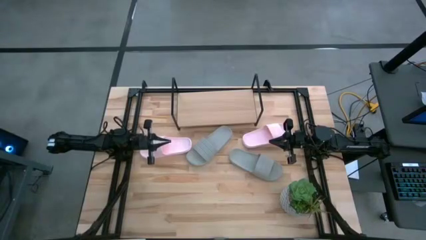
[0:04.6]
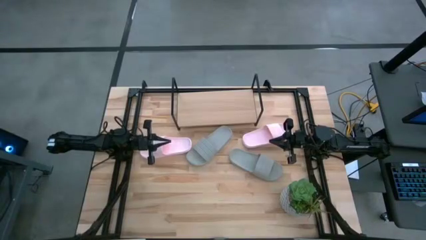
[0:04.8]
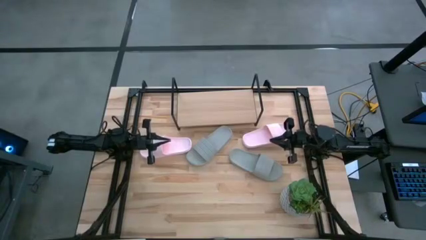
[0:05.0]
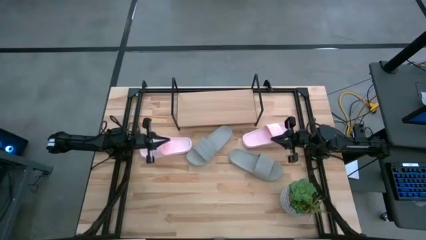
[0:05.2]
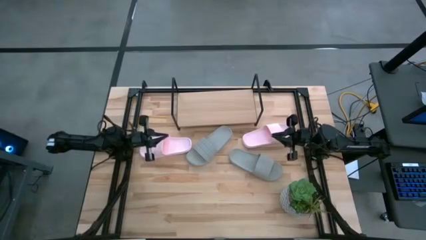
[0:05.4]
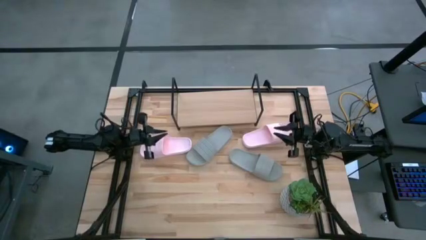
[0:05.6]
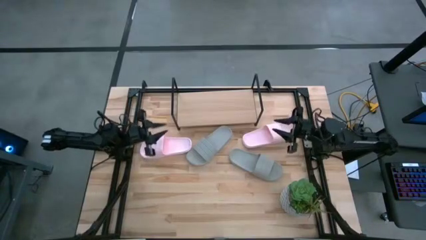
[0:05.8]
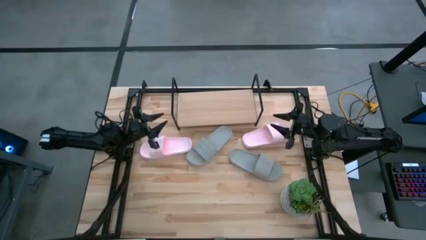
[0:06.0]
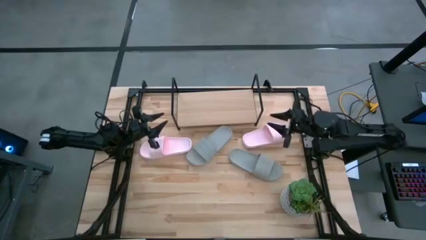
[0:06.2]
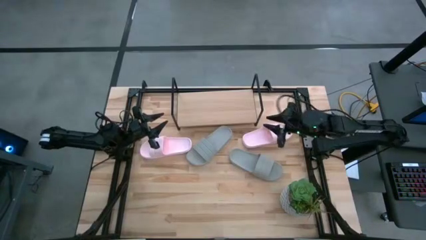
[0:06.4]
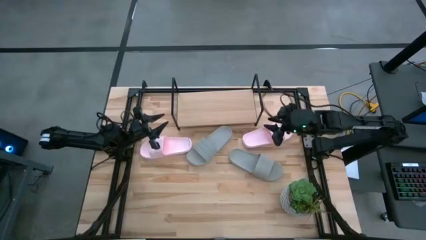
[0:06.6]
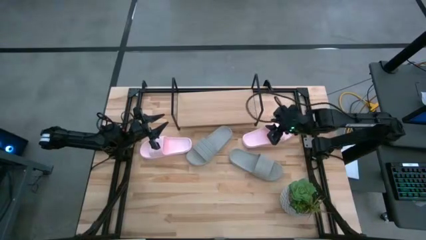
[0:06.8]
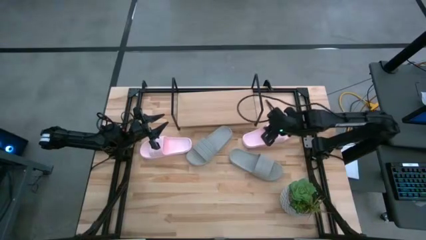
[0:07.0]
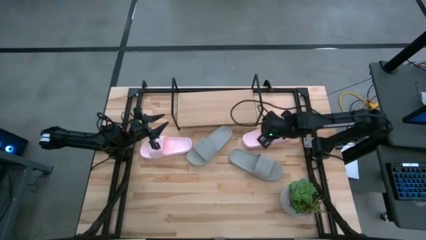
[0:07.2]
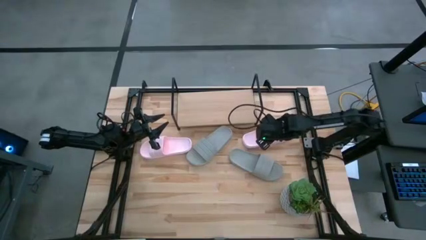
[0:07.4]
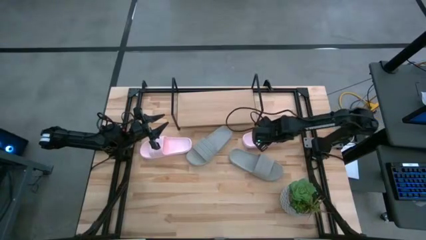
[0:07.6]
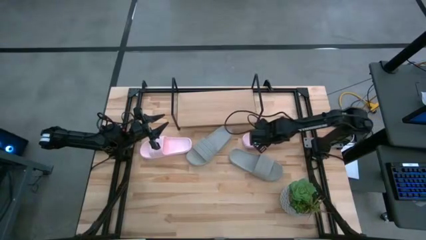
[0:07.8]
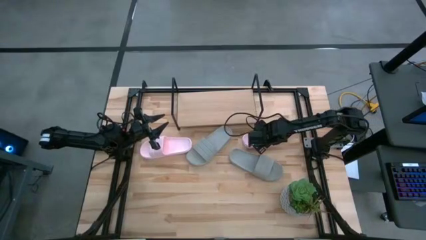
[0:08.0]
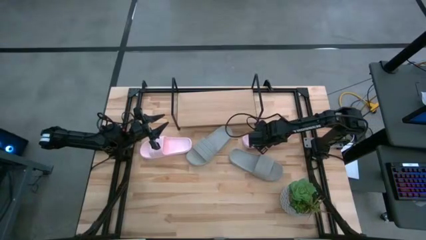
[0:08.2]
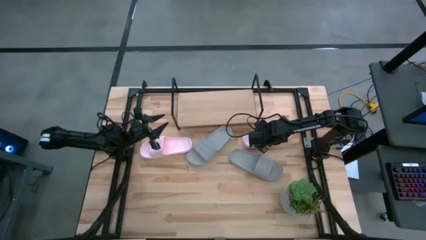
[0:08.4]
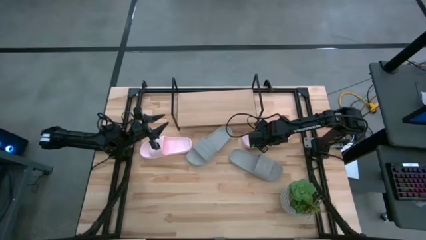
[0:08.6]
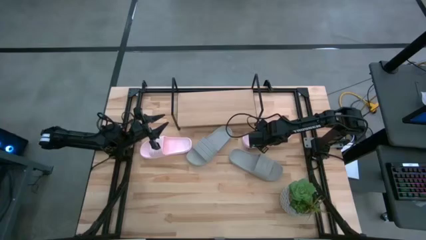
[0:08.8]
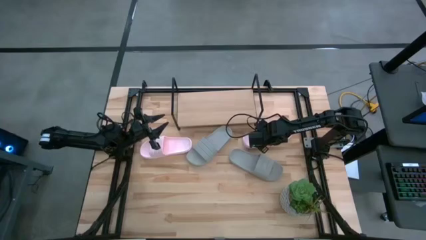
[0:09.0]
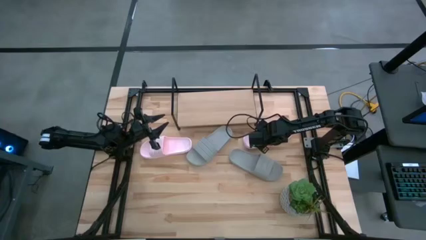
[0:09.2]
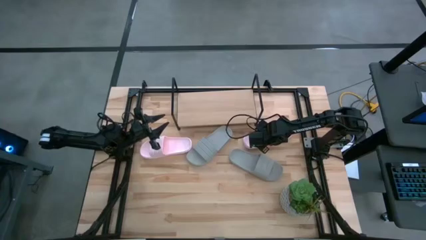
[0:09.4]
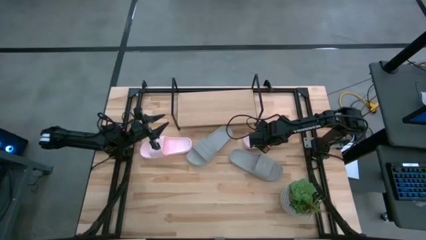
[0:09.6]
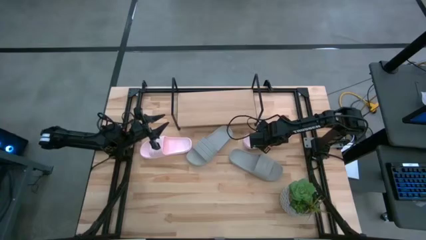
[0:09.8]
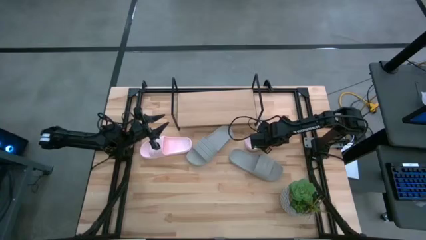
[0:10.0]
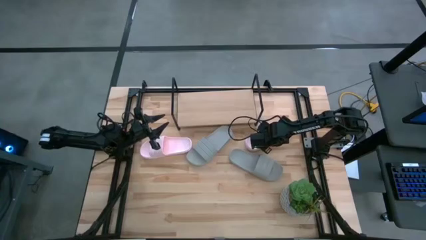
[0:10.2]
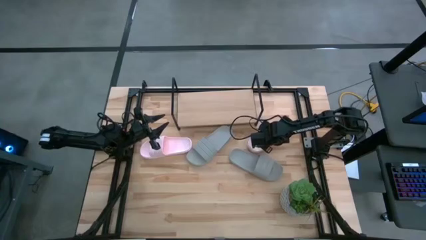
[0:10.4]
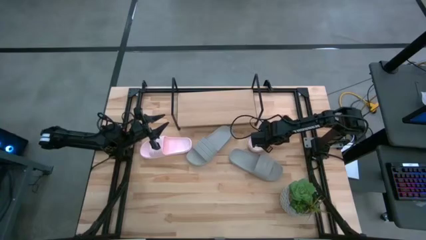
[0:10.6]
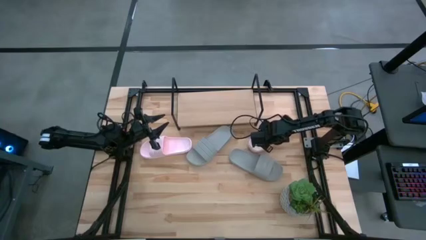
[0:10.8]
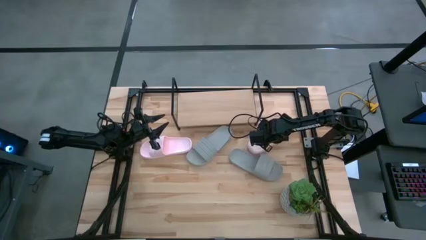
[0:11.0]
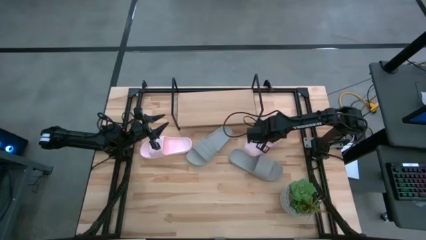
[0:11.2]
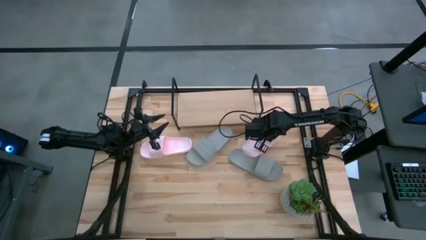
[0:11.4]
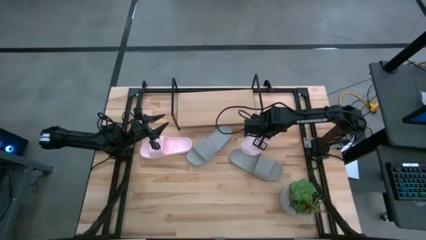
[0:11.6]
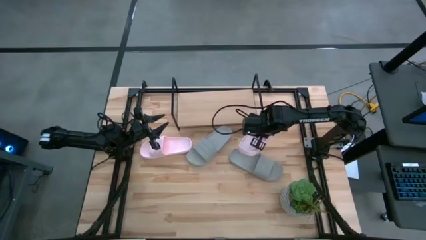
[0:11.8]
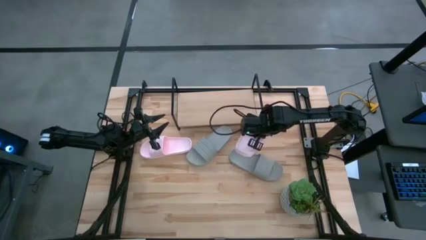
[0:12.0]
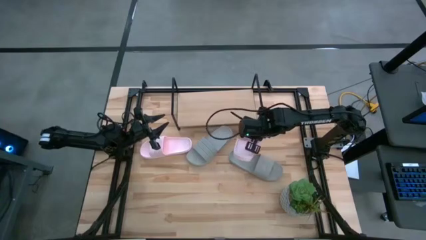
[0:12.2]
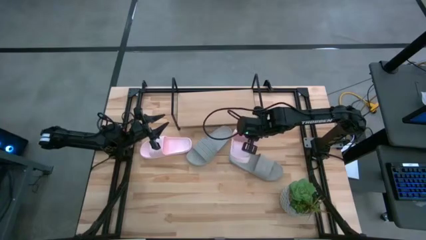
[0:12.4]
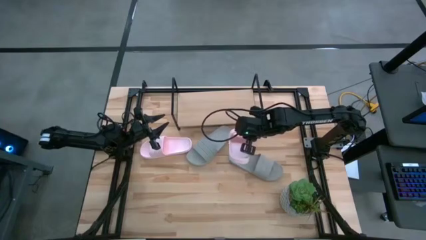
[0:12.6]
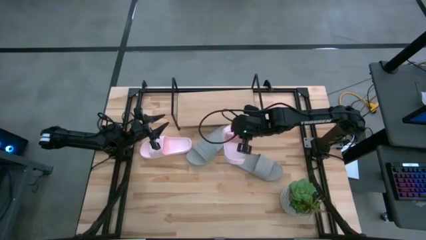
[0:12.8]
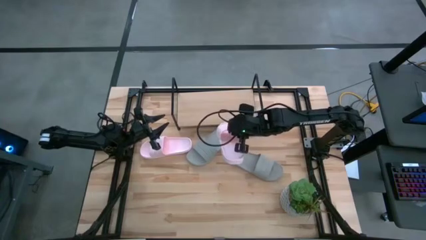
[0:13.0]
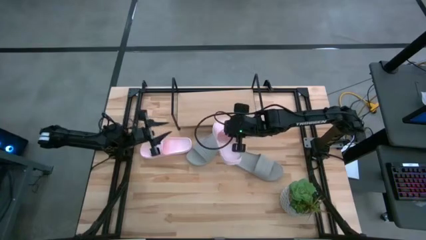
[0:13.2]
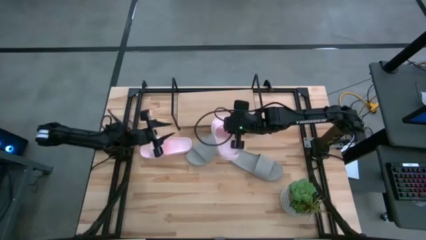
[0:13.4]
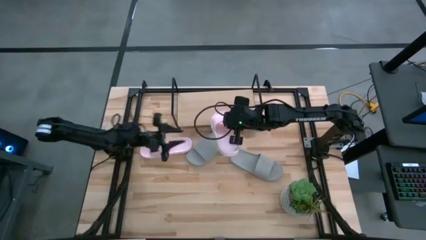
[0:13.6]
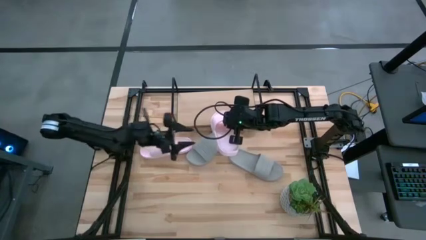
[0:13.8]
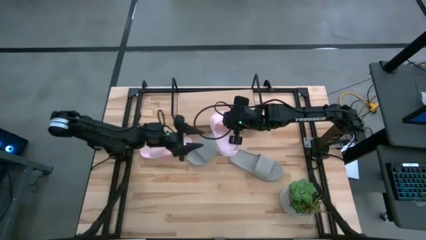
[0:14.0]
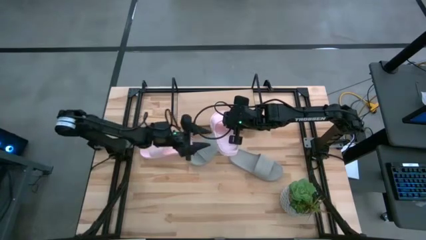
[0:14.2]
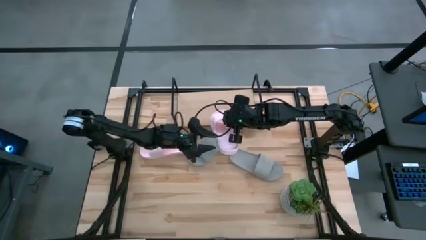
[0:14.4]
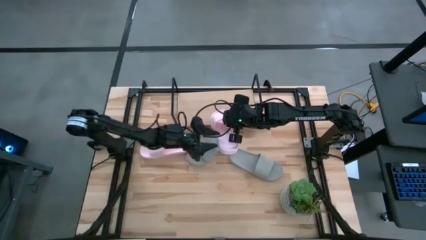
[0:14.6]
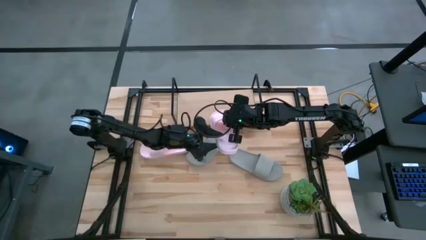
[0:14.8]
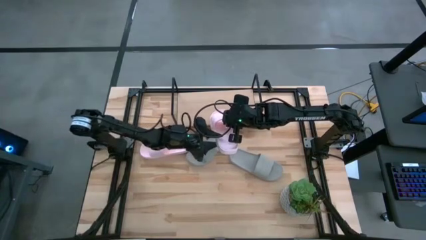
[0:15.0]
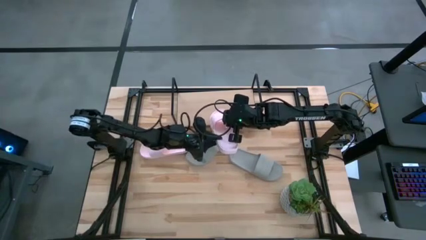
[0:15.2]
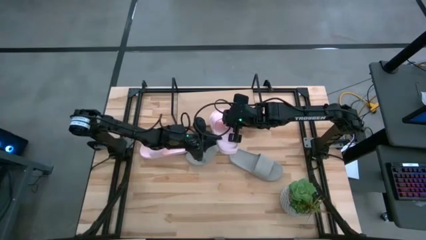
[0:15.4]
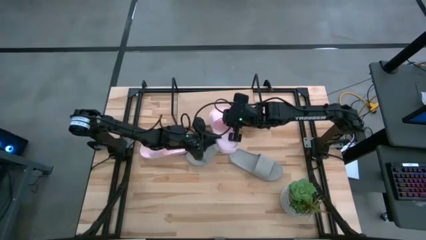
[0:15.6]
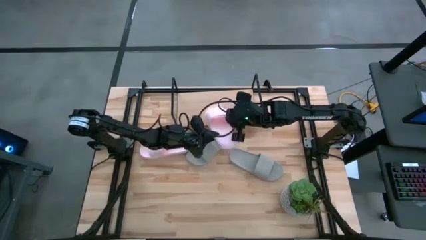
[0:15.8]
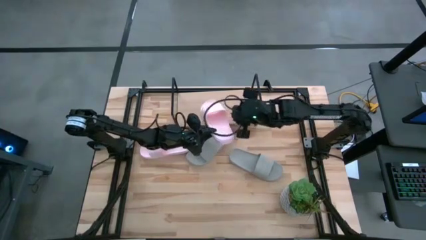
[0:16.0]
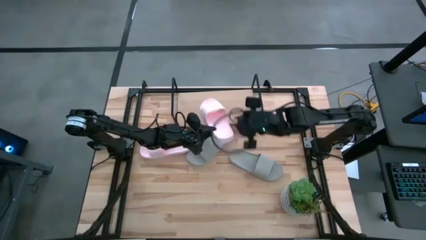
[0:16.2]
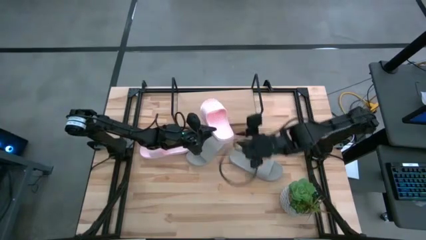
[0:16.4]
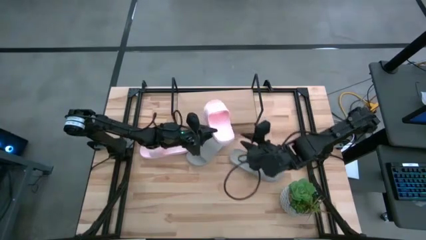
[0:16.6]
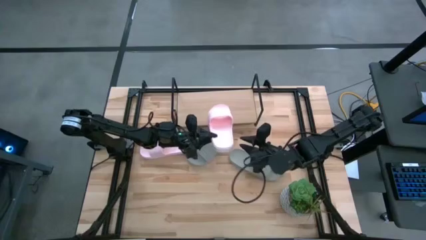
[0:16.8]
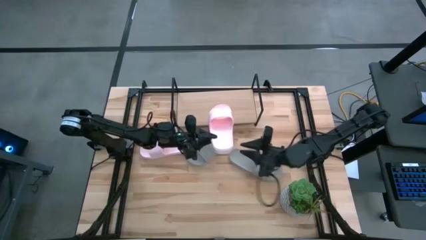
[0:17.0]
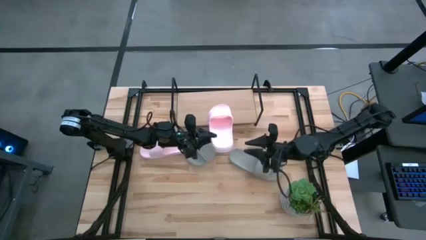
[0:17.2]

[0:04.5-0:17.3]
Task: Pick and place slides into the shelf
Put the right pink slides on the shelf

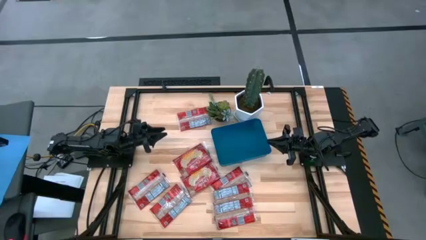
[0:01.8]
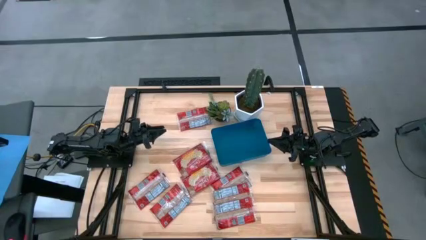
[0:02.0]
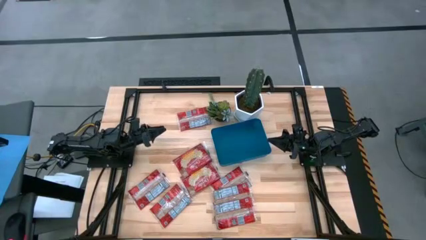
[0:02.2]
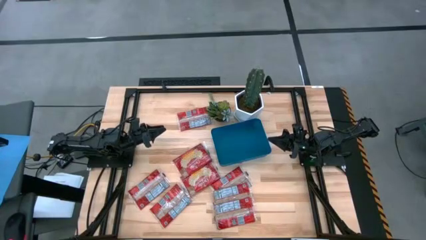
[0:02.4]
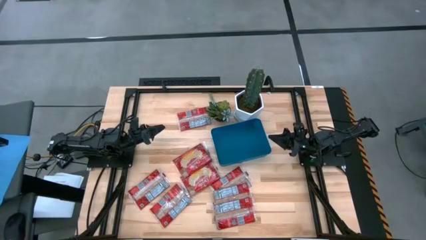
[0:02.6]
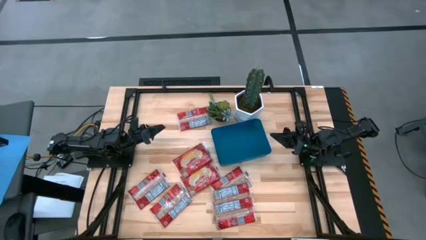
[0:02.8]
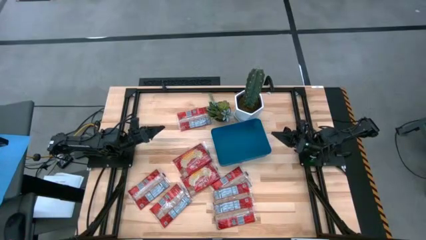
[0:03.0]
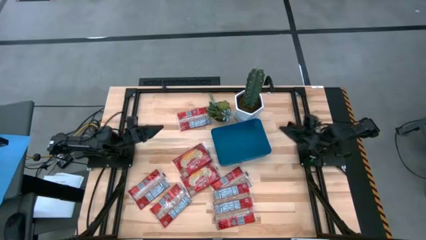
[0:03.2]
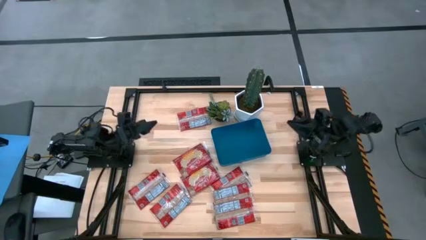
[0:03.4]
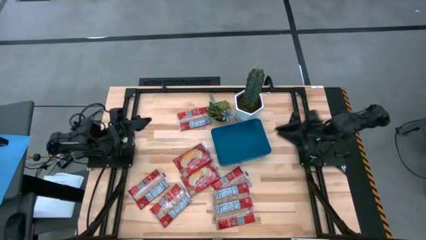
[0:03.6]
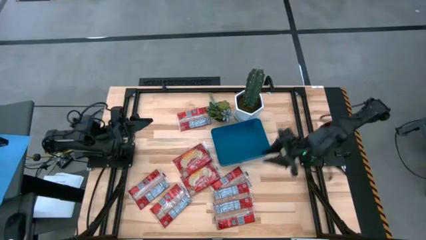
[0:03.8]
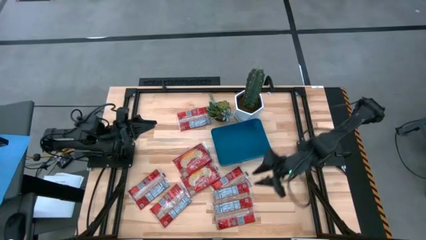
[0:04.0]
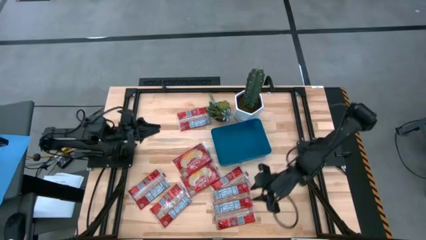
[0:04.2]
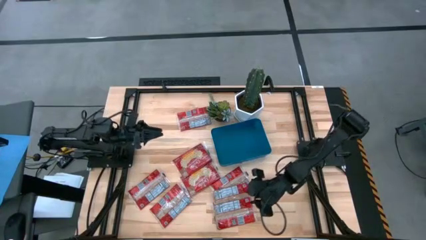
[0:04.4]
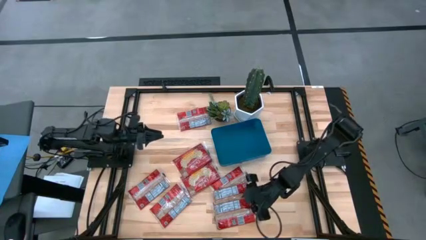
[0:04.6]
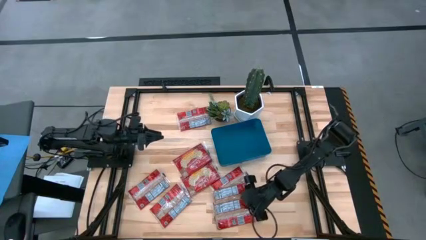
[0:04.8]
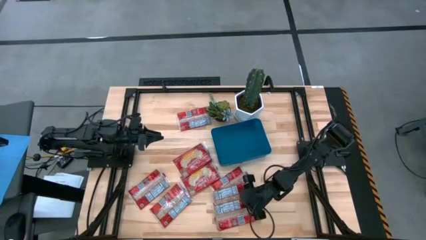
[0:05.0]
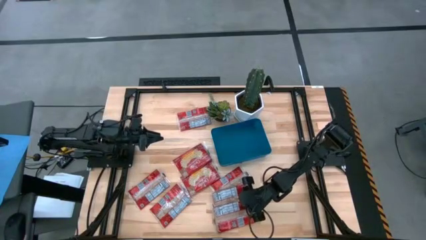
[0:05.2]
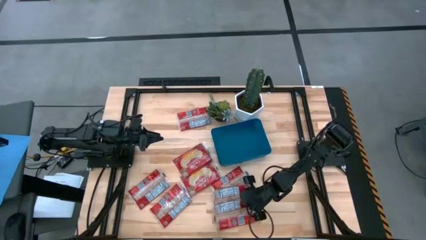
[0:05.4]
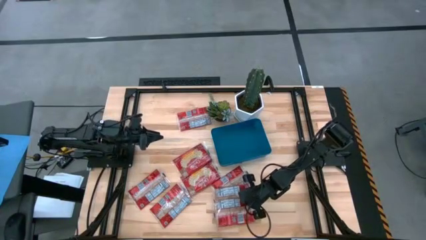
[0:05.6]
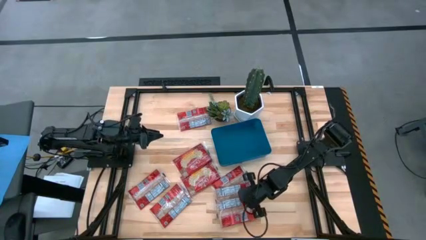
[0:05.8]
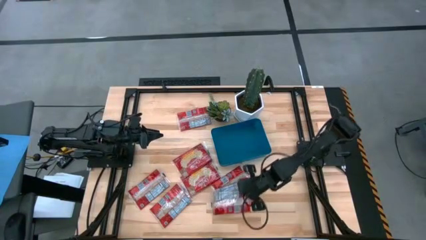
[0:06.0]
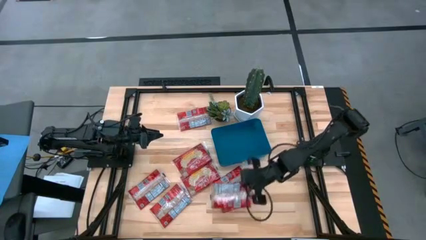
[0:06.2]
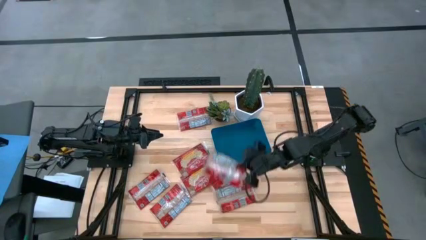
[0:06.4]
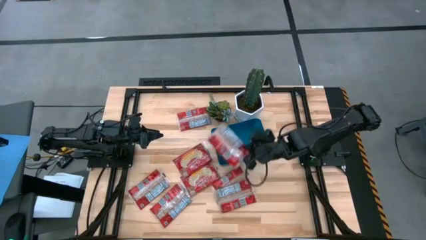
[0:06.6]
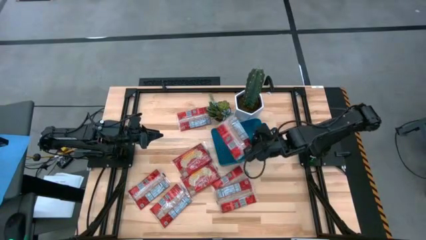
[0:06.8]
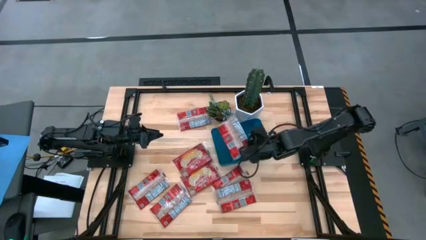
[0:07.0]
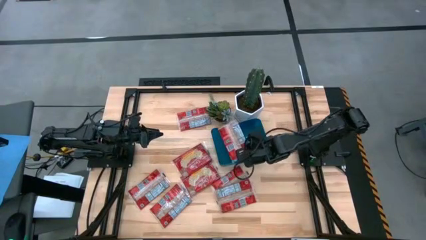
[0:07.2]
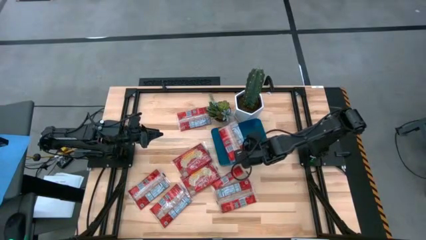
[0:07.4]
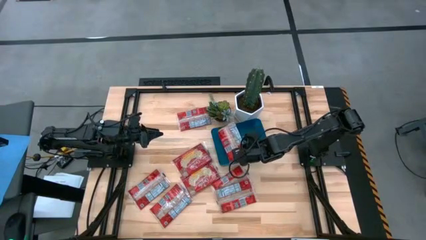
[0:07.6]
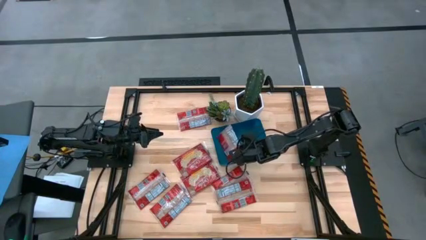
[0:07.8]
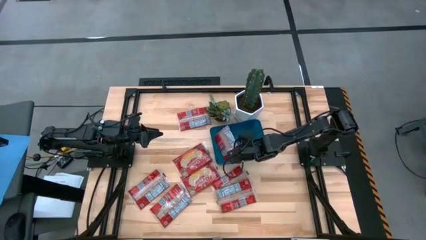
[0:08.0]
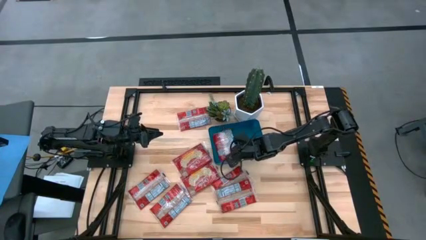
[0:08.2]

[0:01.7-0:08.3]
Task: Sort popcorn bags into baskets
Put the red popcorn bag into the blue container
